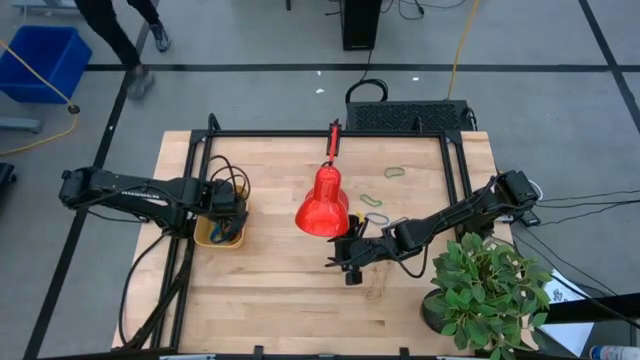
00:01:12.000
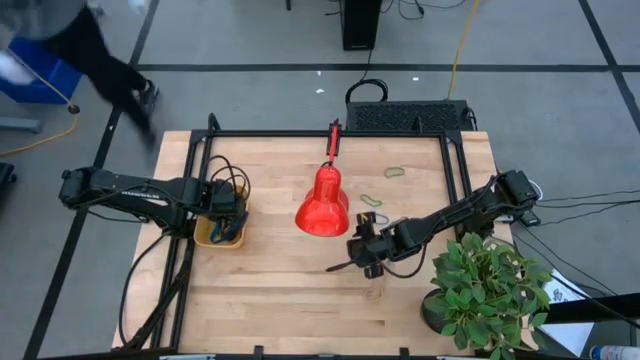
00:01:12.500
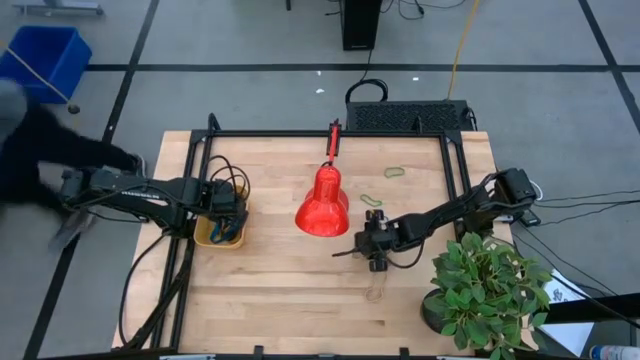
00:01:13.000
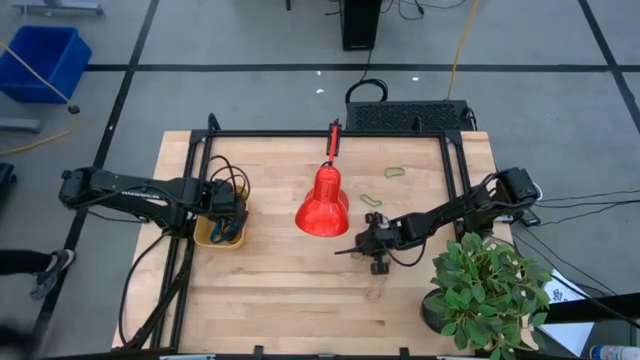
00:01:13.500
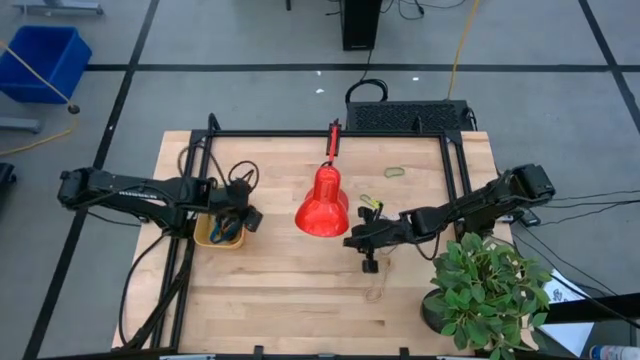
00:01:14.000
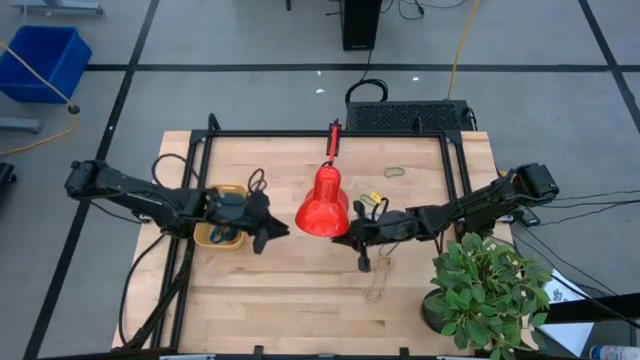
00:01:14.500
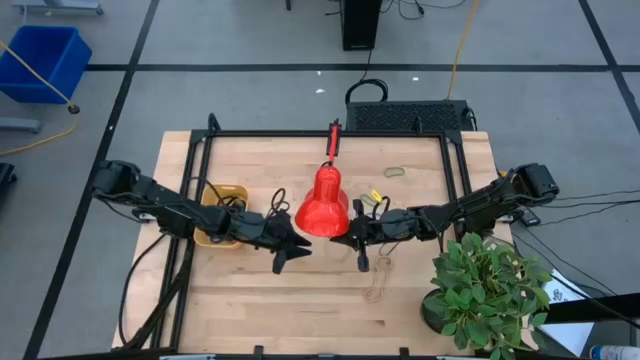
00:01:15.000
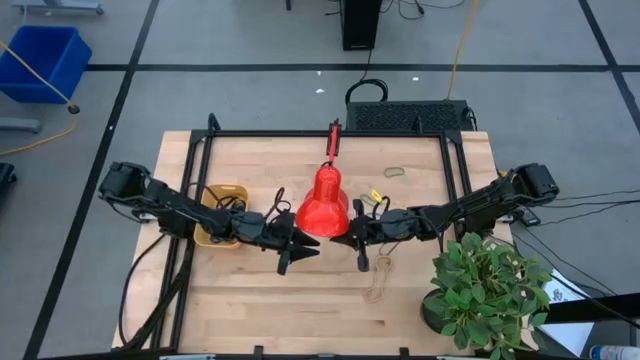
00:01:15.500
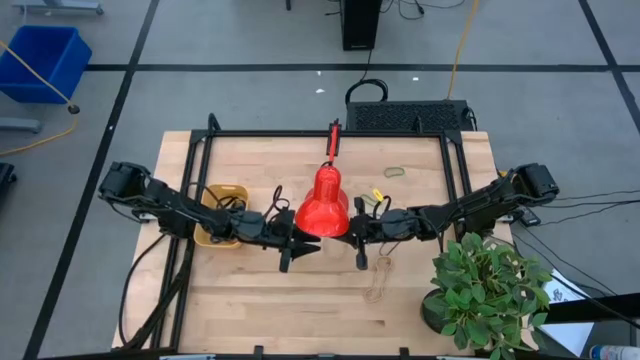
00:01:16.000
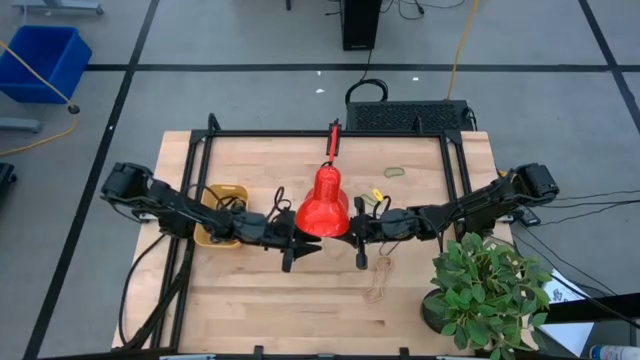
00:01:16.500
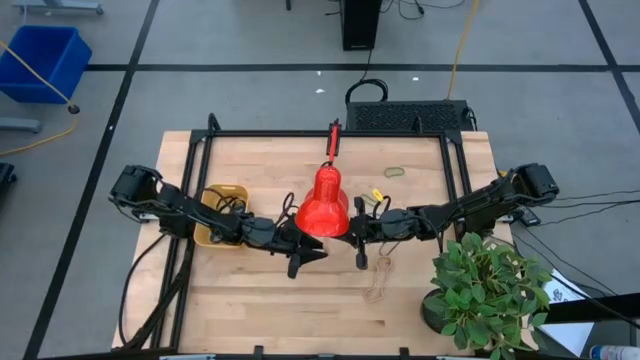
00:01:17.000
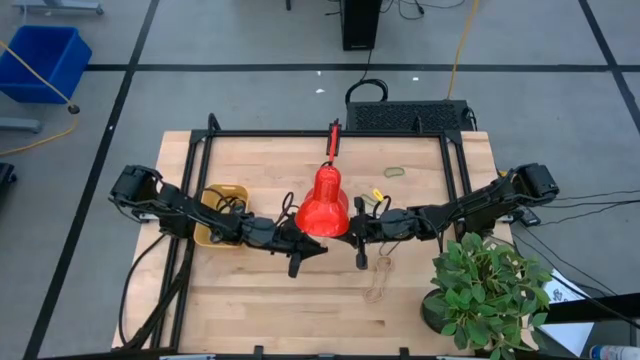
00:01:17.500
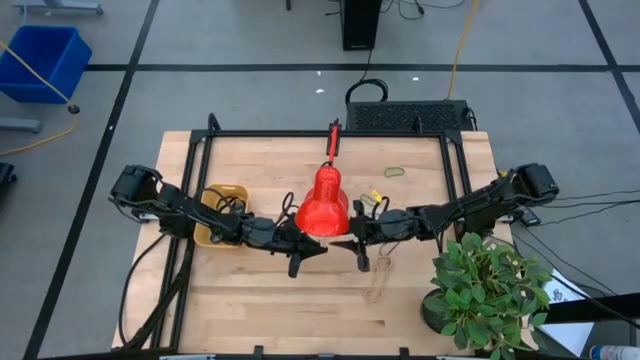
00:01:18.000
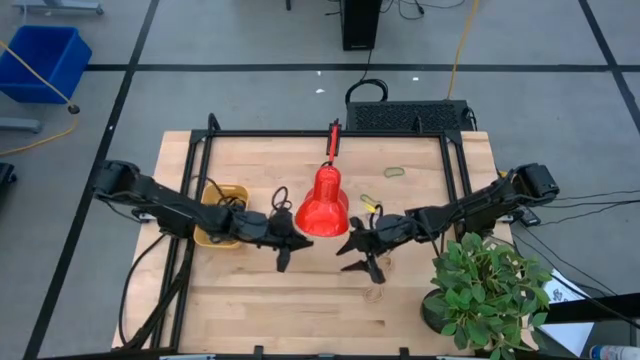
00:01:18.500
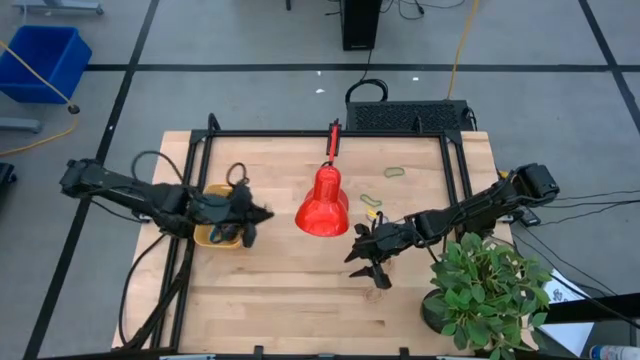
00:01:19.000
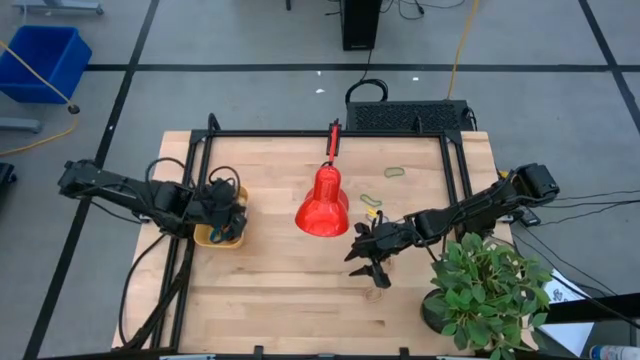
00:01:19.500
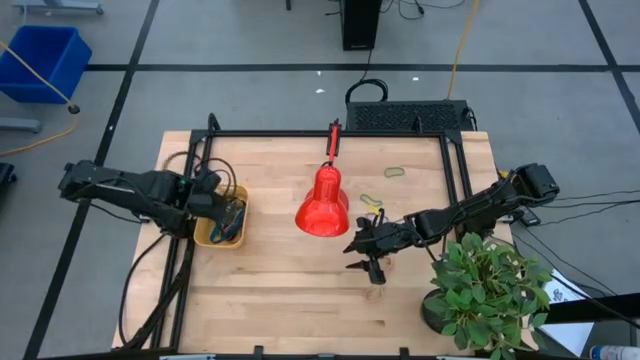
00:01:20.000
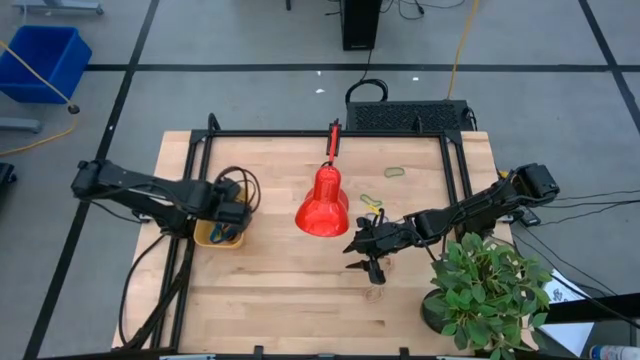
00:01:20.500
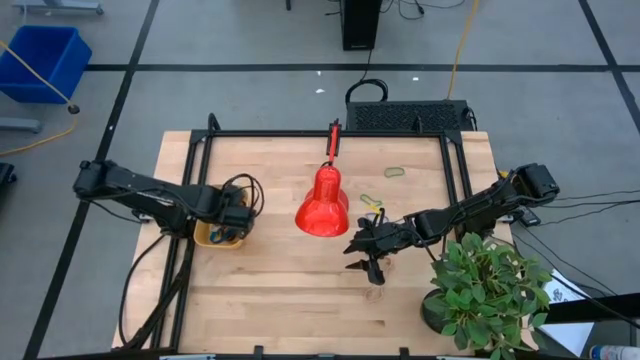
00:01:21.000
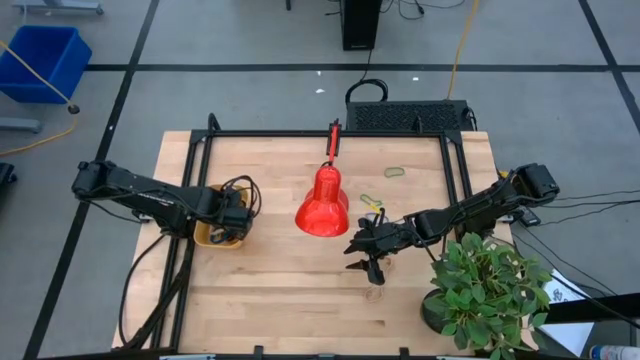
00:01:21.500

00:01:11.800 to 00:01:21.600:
Task: Pick and place rubber bands into bin
Put the top white rubber band into the yellow bin

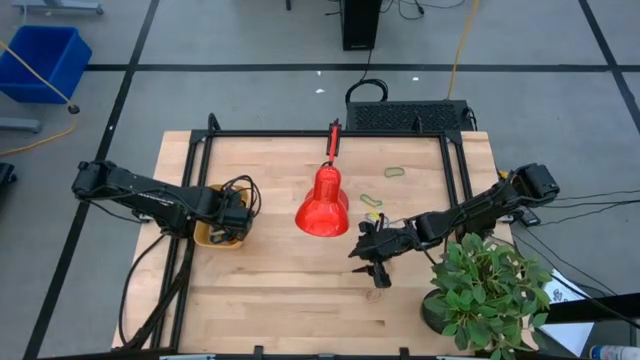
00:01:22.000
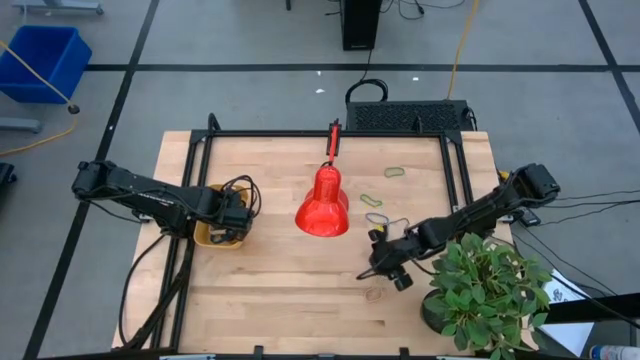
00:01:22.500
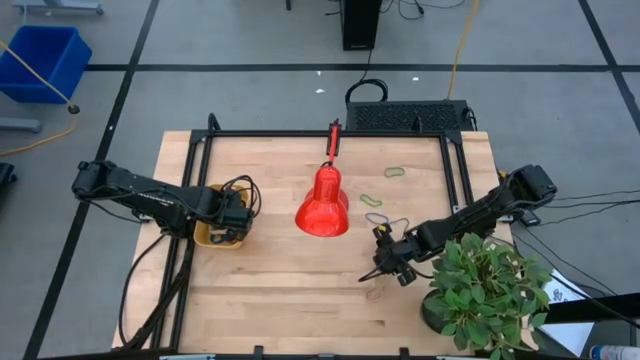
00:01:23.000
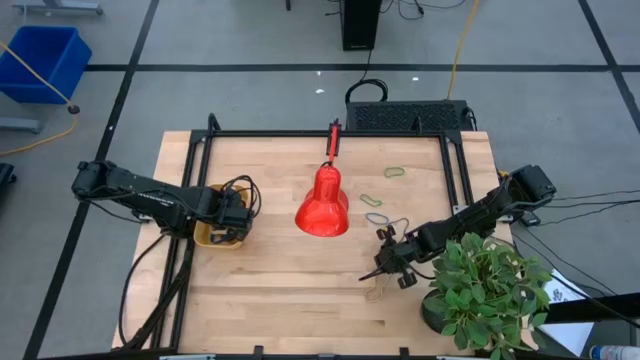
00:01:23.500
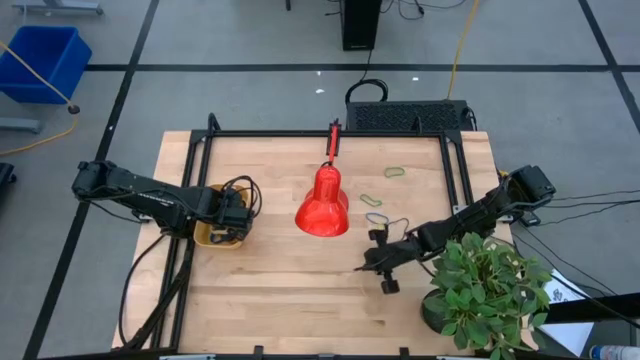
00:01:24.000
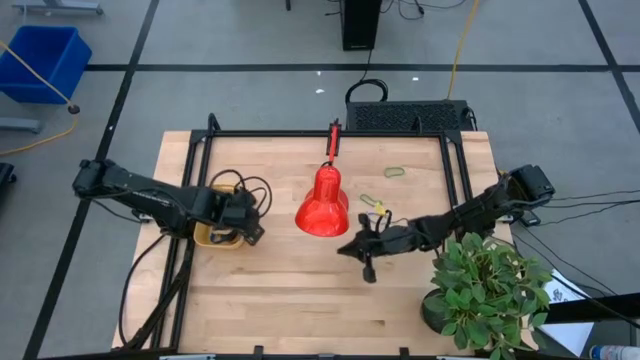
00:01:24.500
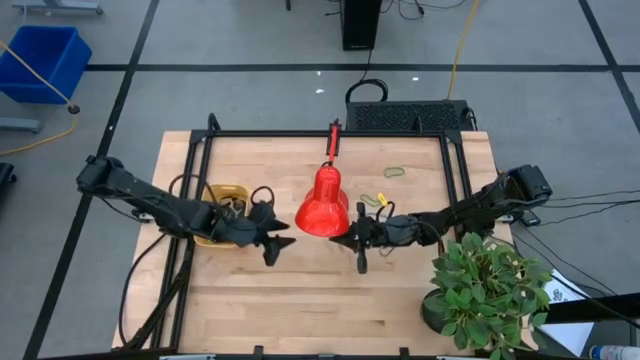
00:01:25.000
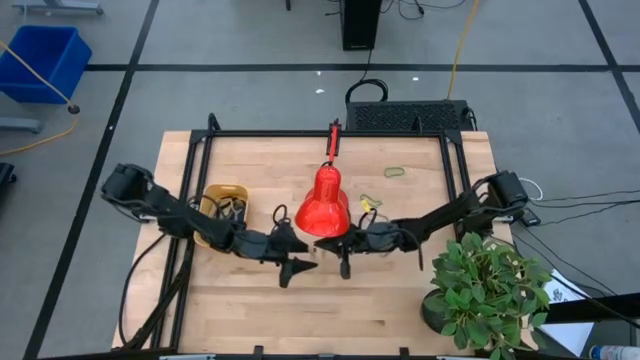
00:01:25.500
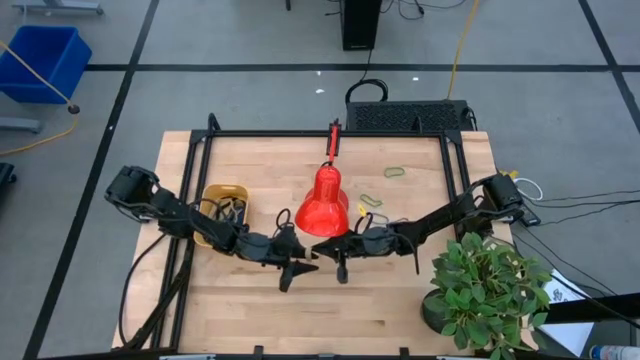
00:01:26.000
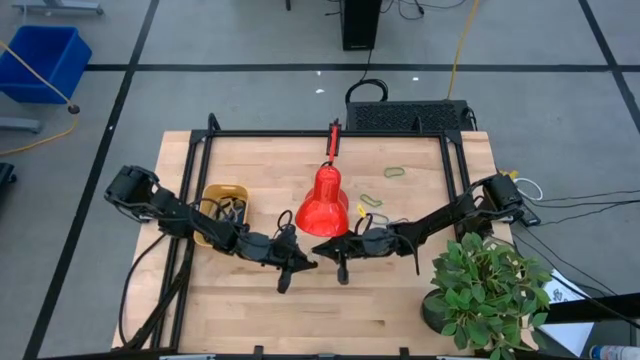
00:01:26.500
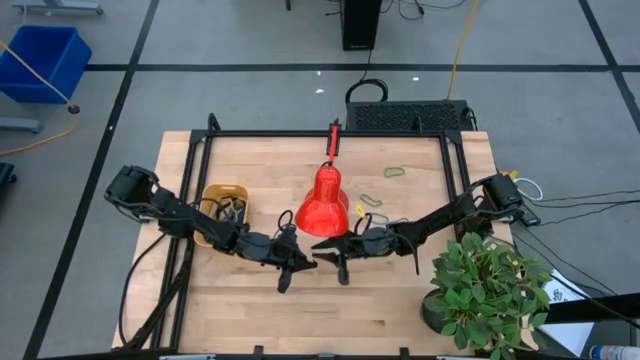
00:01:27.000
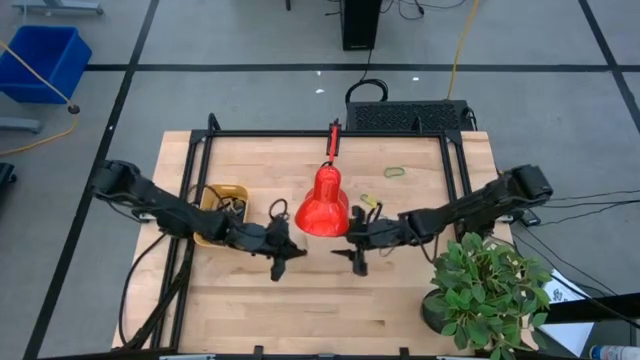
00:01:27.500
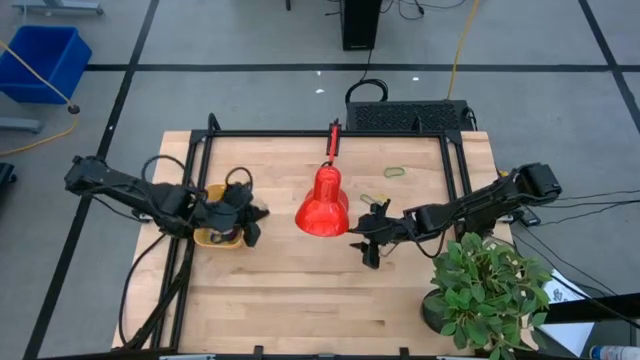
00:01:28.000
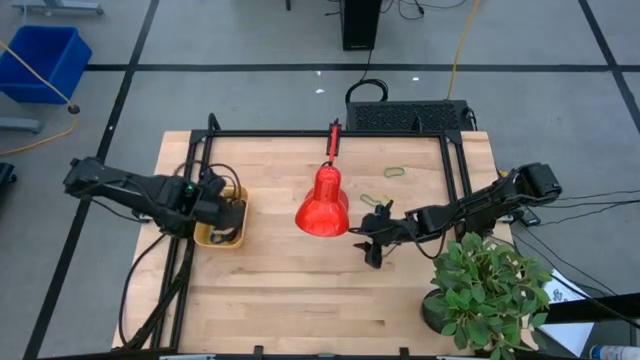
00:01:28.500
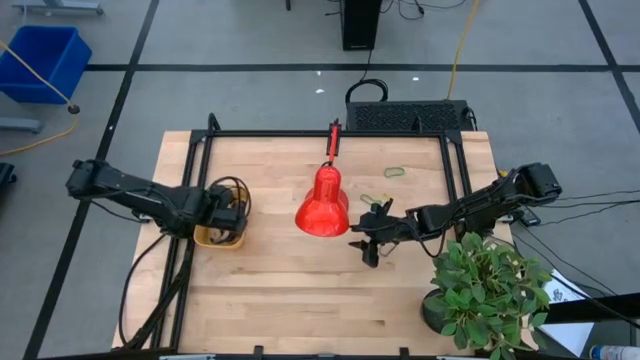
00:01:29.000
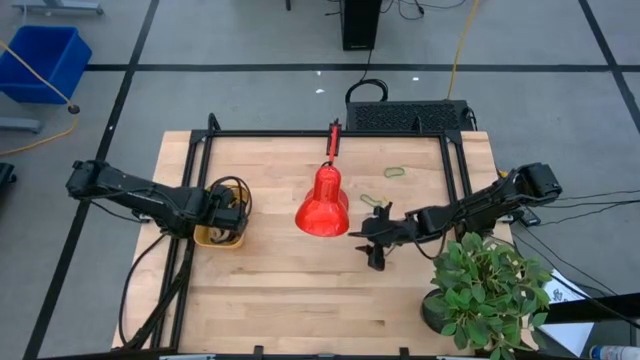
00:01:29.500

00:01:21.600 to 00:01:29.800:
Put the white rubber band into the yellow bin

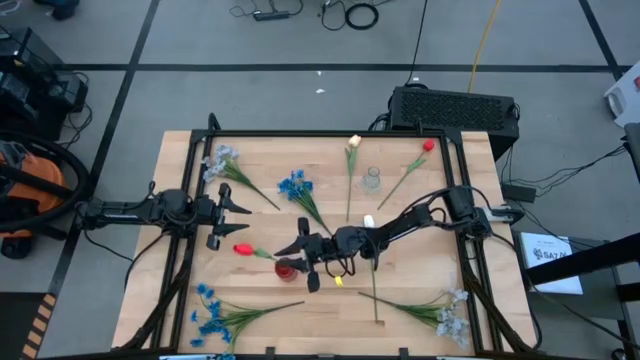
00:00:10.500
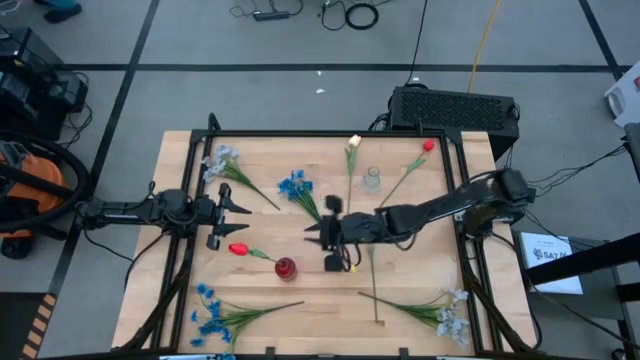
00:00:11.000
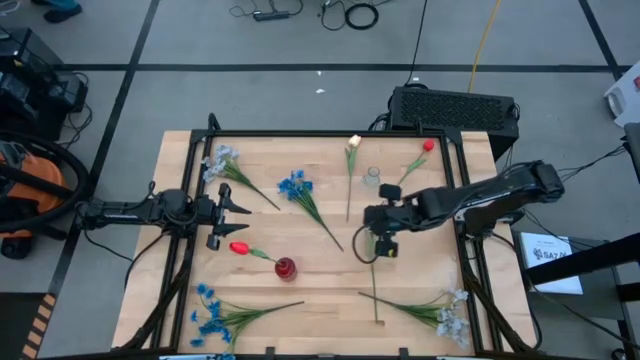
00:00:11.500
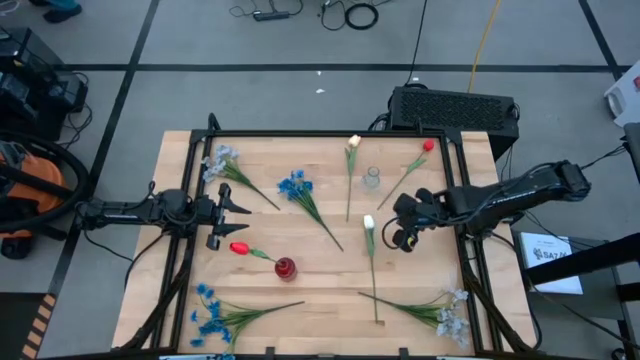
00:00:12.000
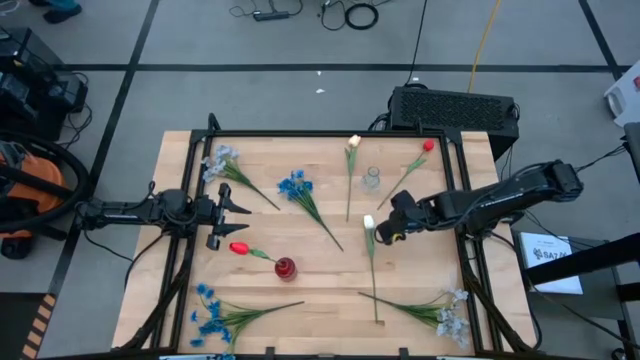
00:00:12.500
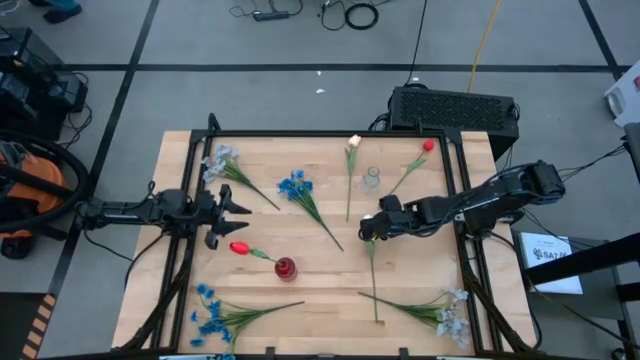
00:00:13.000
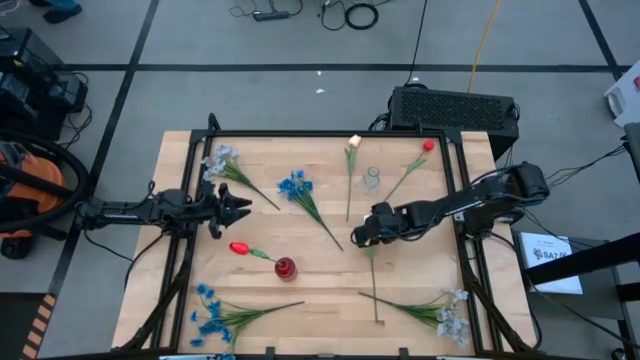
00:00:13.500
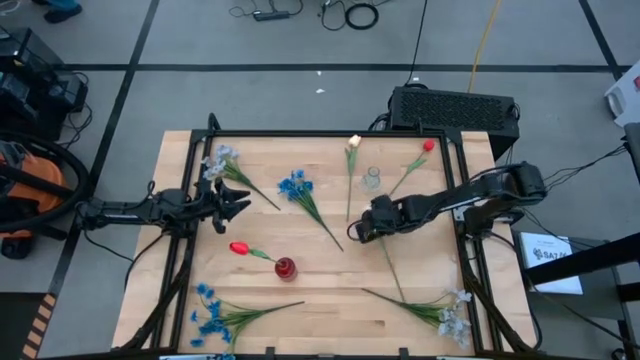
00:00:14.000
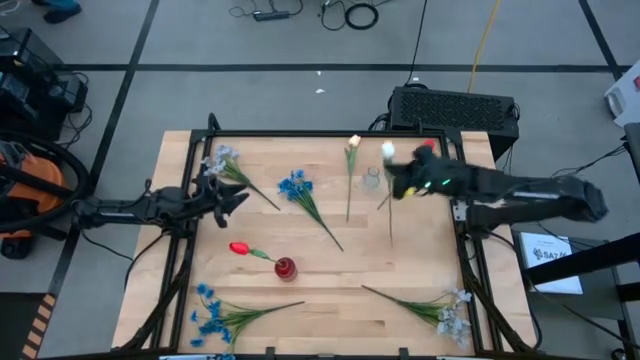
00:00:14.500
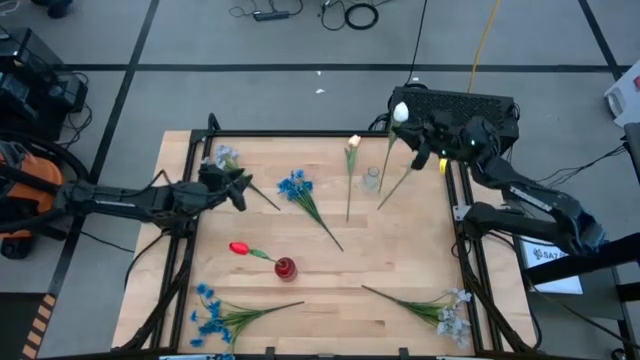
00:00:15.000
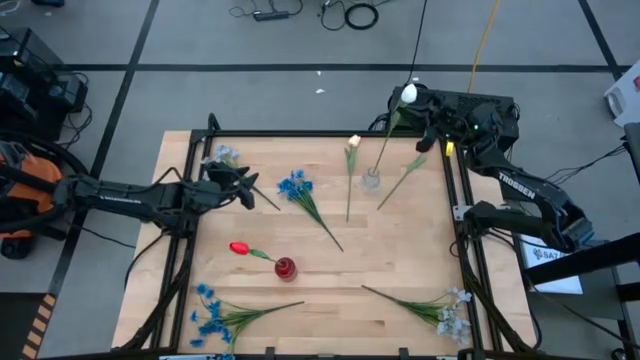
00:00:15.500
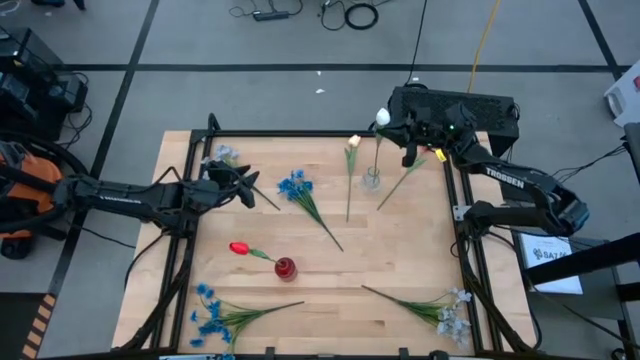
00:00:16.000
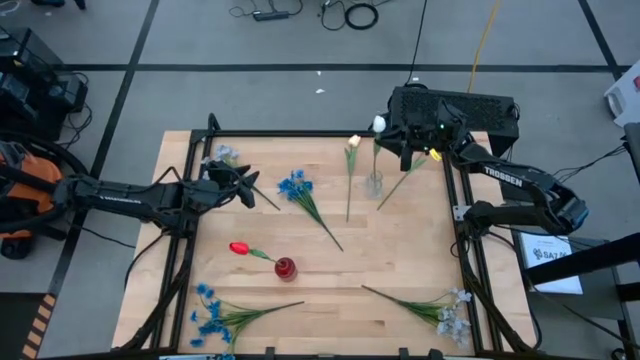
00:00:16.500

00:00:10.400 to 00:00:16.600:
Task: Sort flowers into vase by color
Put the white tulip into the transparent vase
